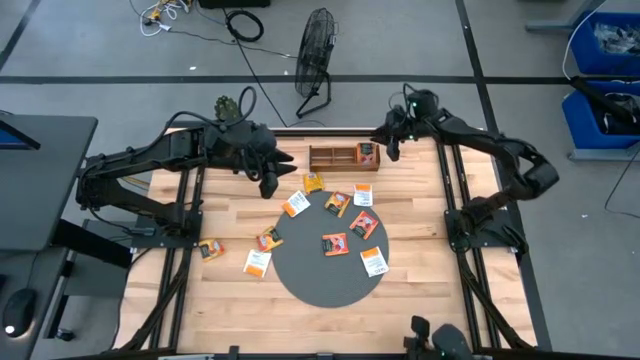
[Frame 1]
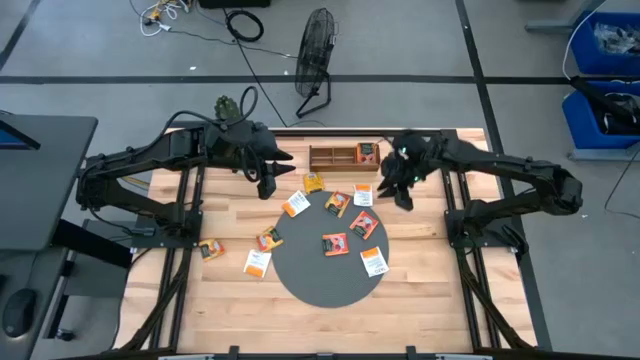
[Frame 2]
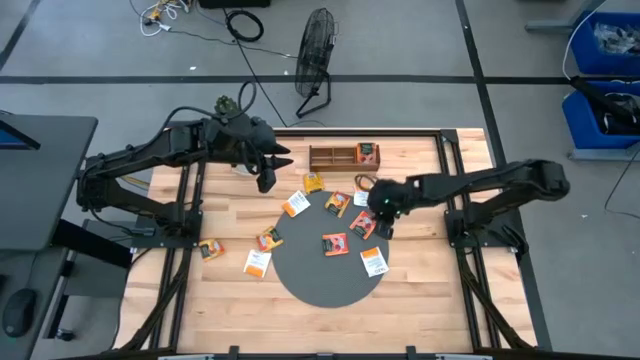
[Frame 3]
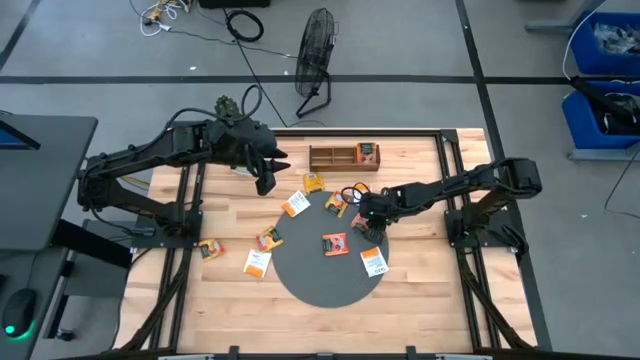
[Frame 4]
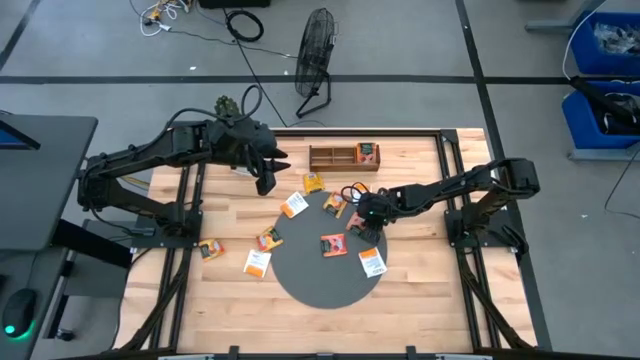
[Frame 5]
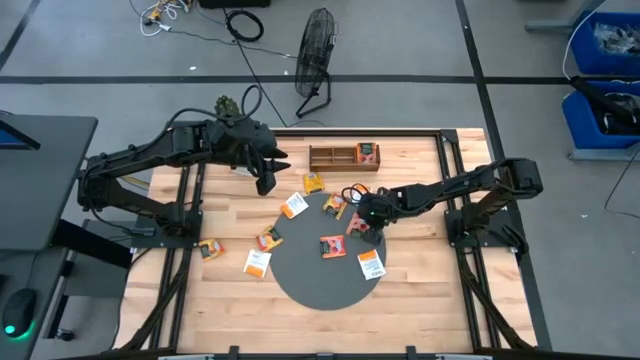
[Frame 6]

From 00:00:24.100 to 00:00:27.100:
Task: Pick & Place Tea
Put the yellow tea bag into the right section of the wooden organizer

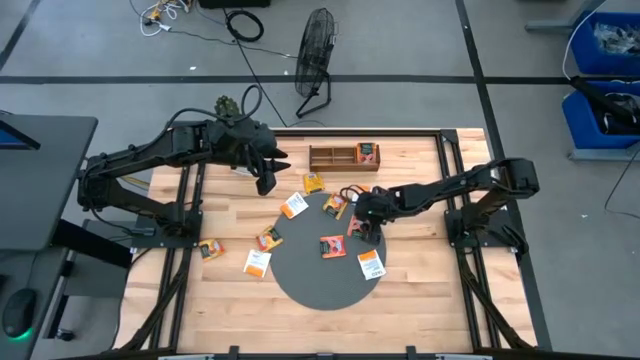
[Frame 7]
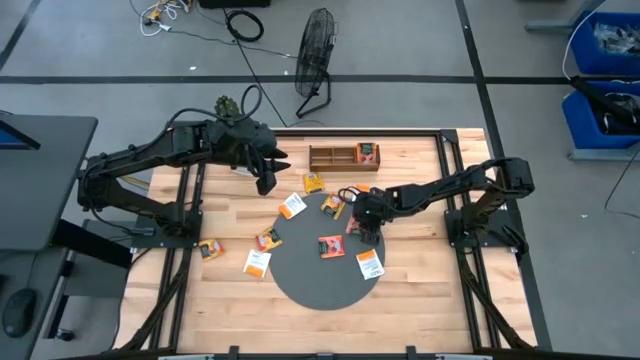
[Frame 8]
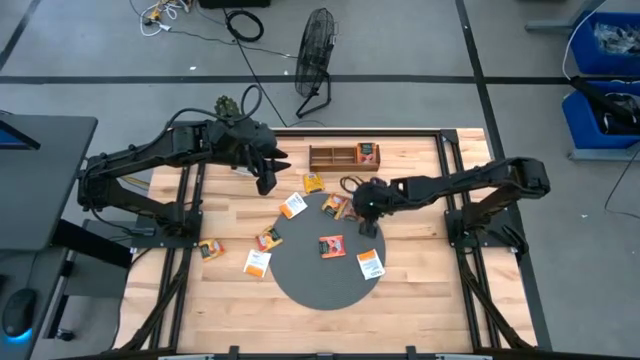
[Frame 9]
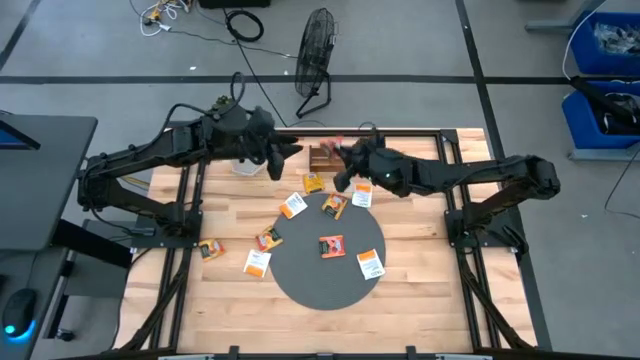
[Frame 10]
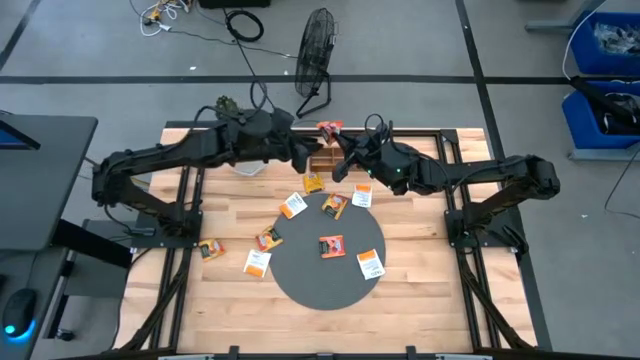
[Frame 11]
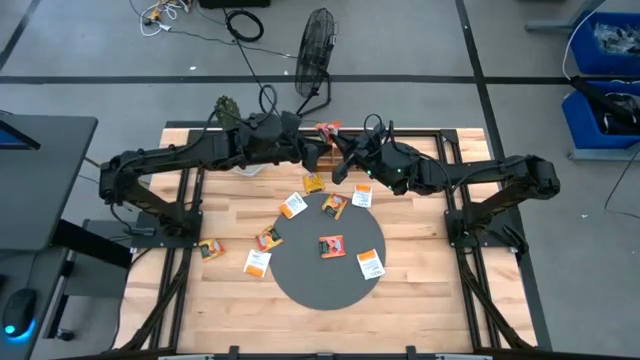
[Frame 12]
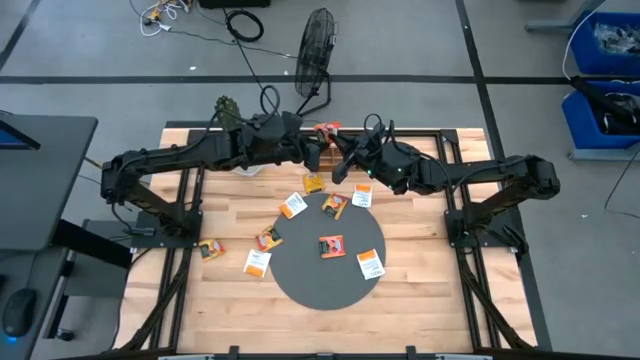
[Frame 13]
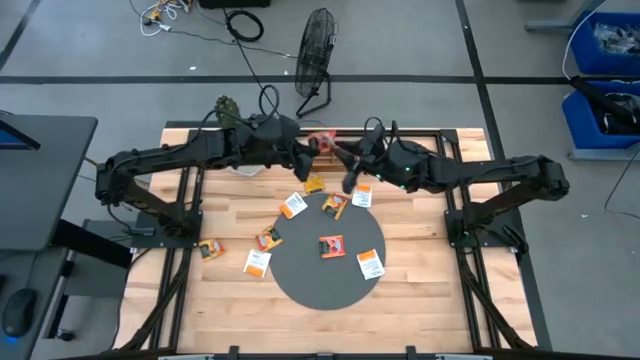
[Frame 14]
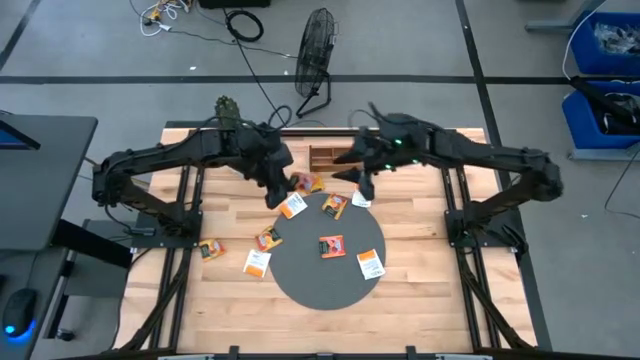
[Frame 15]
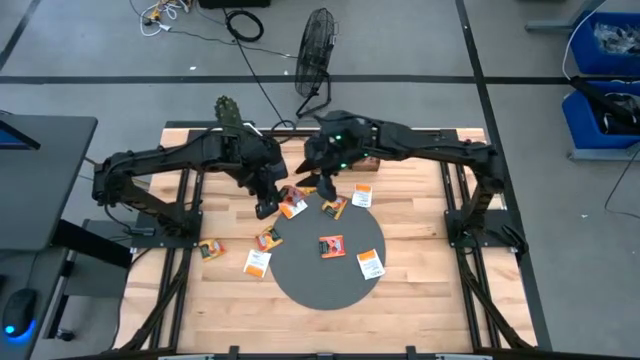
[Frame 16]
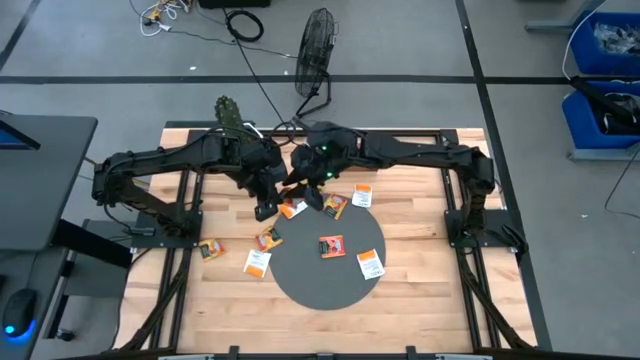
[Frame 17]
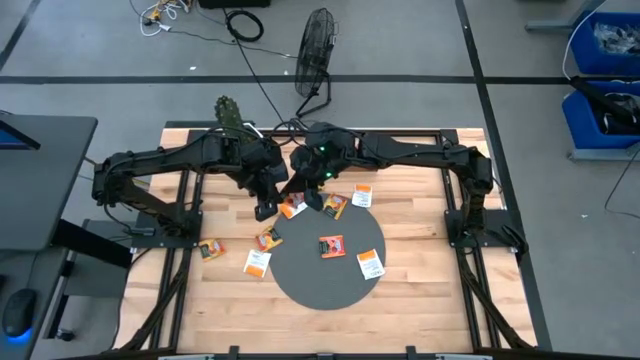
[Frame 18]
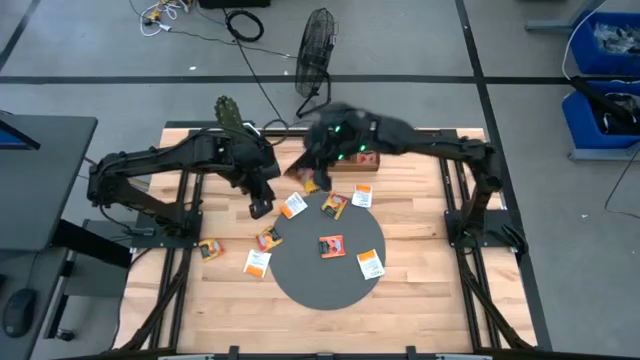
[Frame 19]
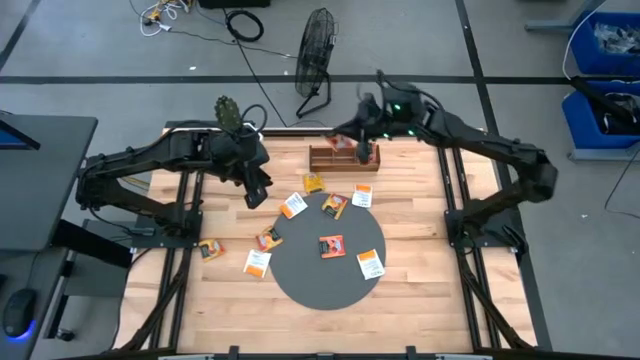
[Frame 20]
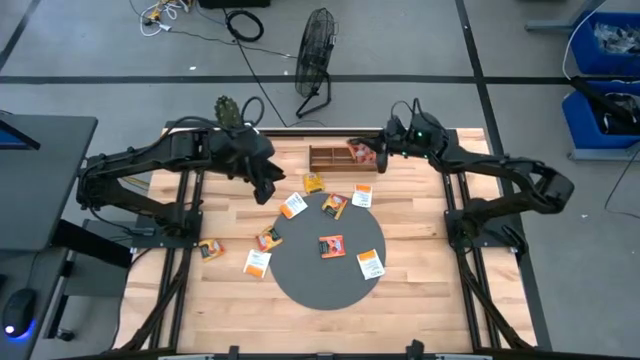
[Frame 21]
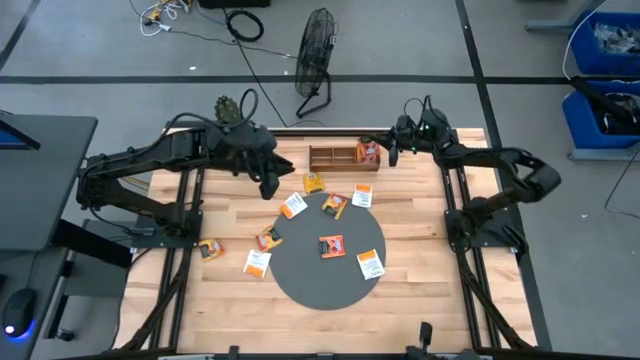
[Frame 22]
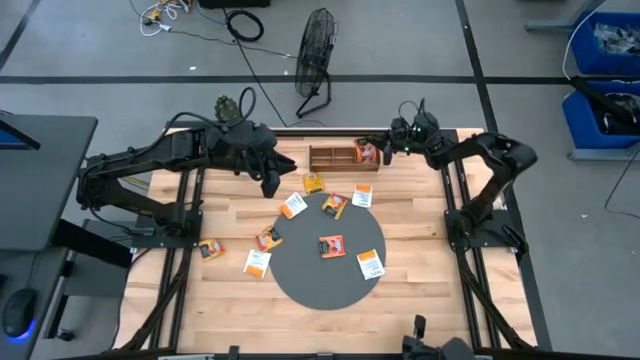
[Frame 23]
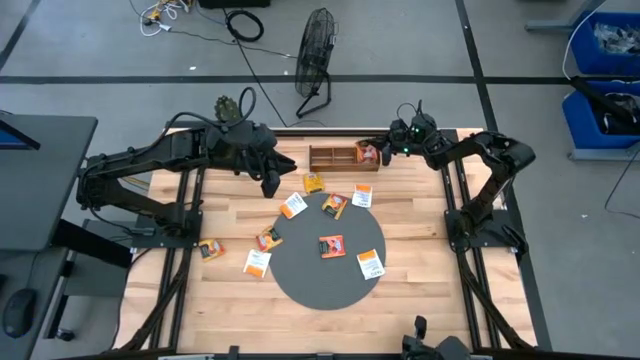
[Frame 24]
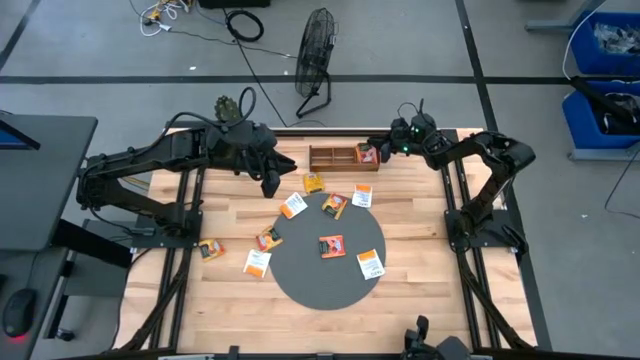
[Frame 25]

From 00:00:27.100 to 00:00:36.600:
Put the yellow tea bag into the right section of the wooden organizer

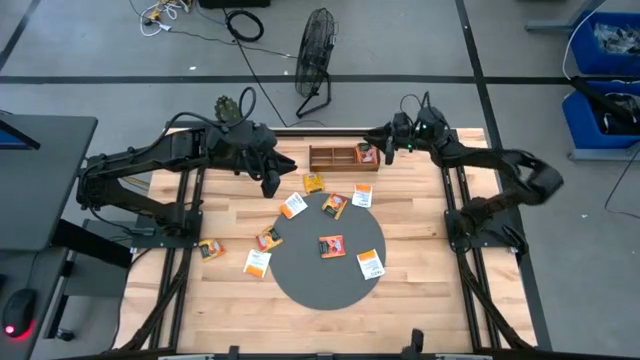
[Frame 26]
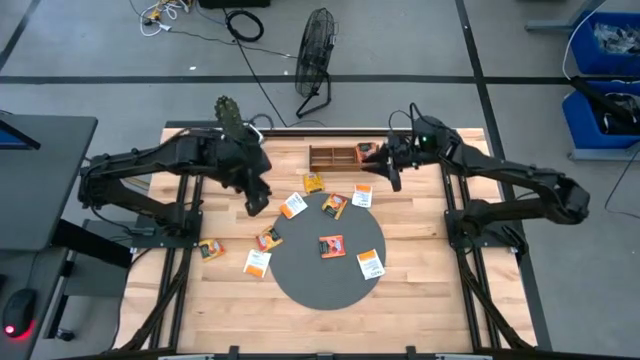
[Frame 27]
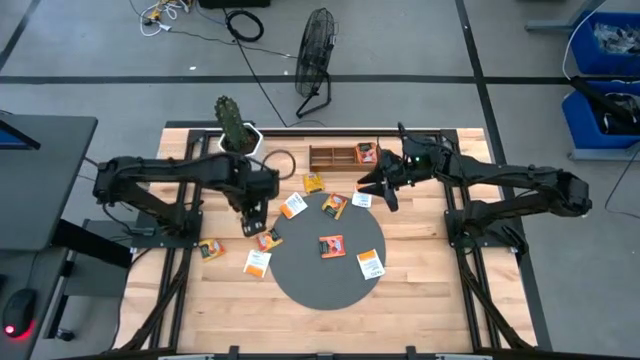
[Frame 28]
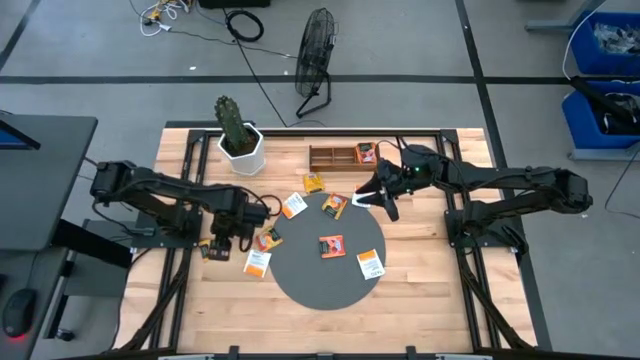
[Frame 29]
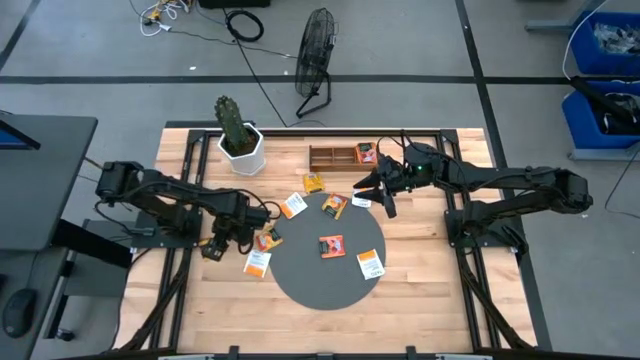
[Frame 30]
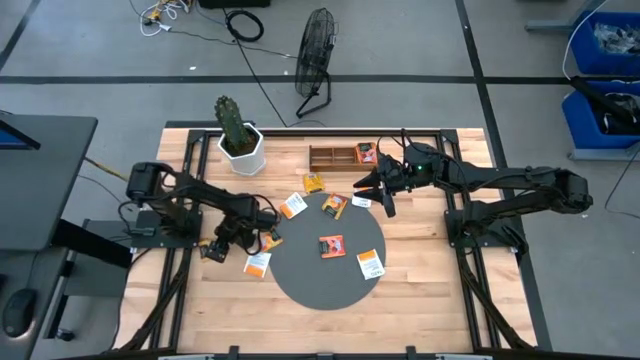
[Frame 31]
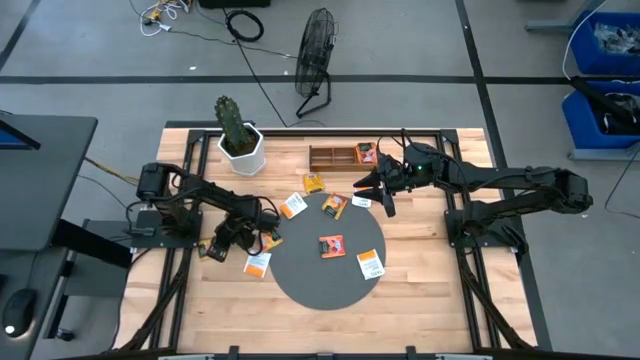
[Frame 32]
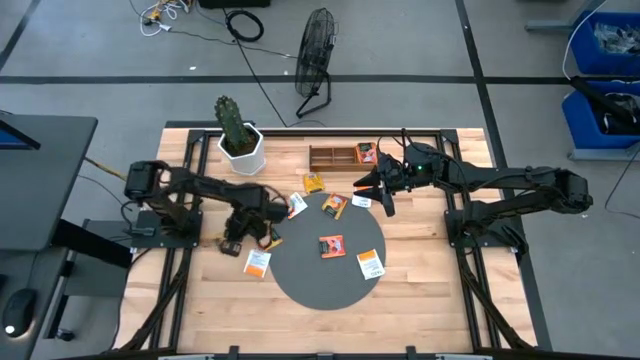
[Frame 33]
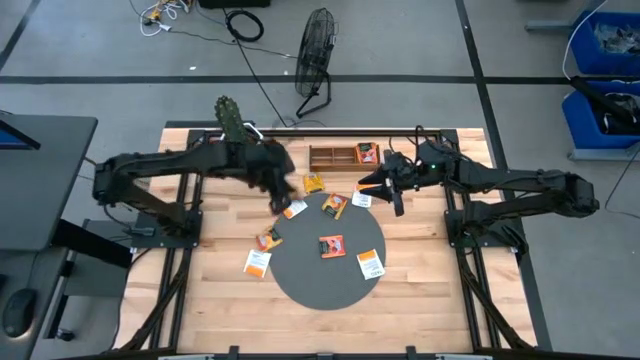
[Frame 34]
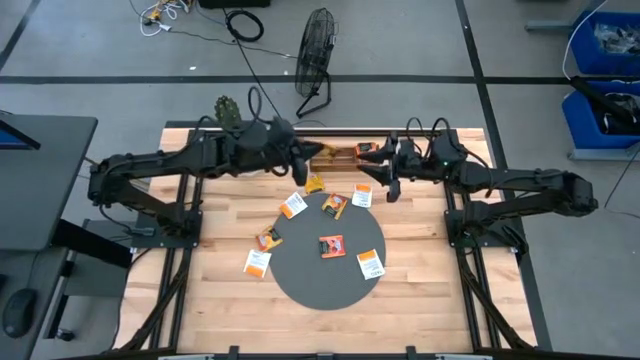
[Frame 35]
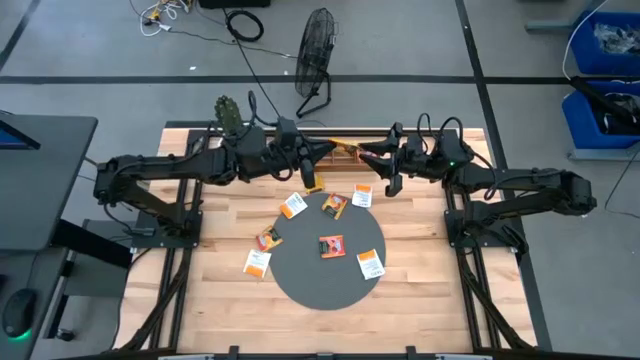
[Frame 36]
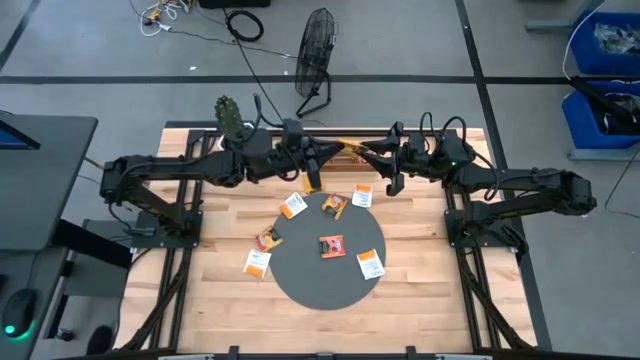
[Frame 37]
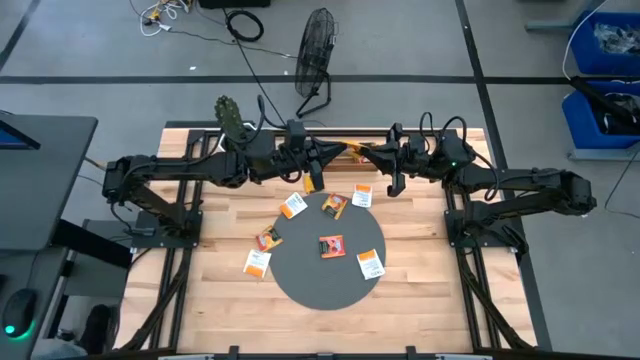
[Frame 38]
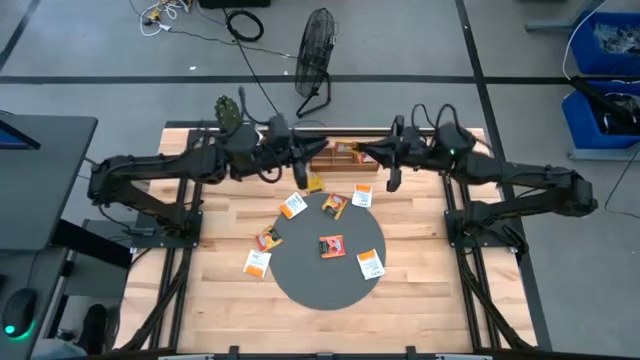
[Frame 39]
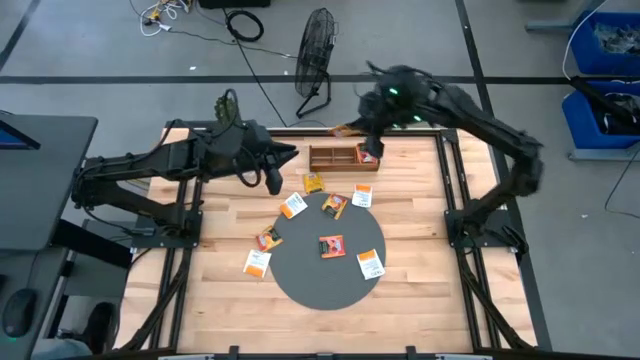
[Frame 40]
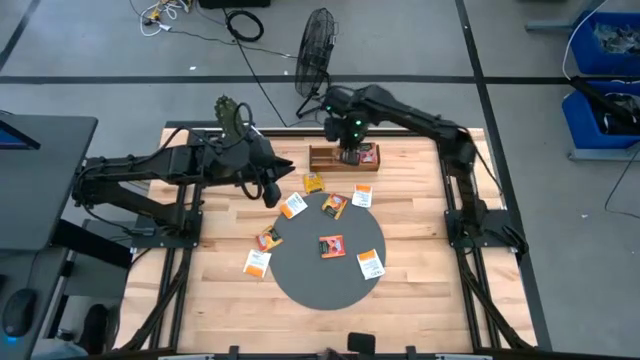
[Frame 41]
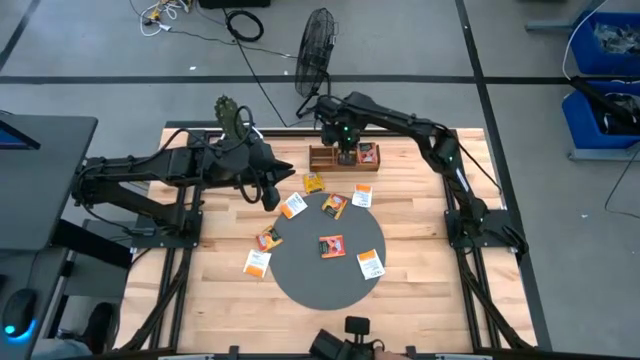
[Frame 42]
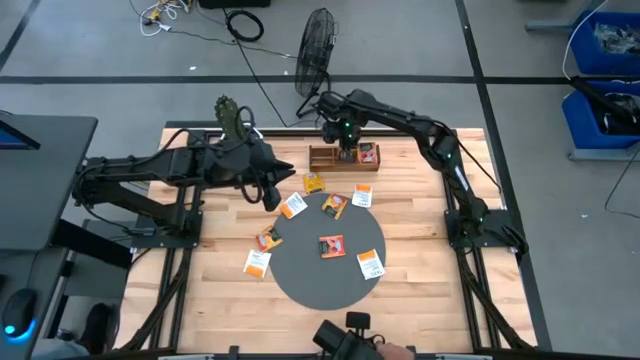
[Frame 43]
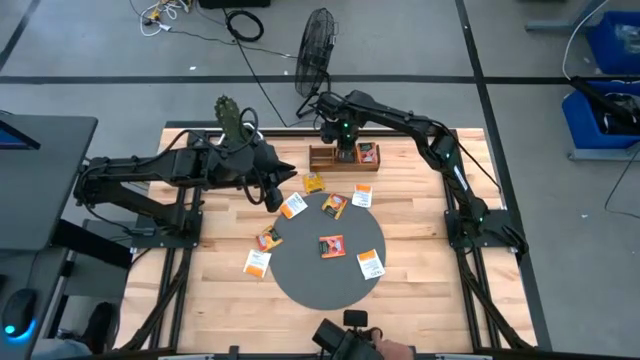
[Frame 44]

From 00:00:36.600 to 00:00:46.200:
Put the orange tea bag into the middle section of the wooden organizer
